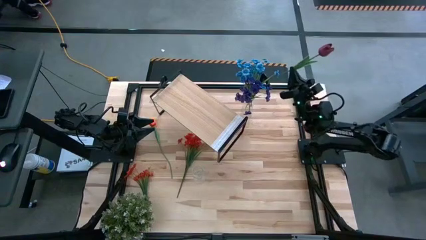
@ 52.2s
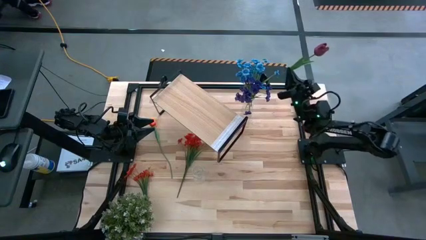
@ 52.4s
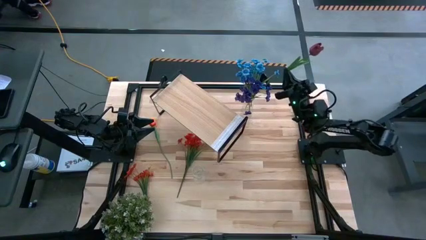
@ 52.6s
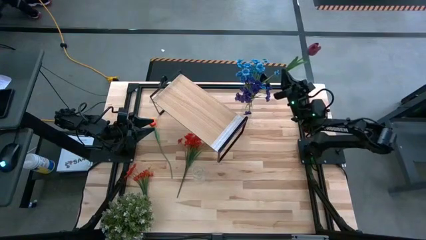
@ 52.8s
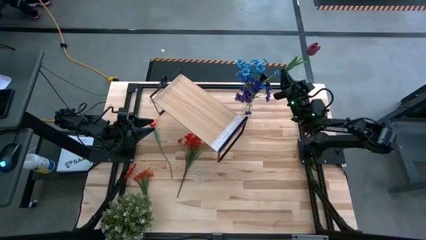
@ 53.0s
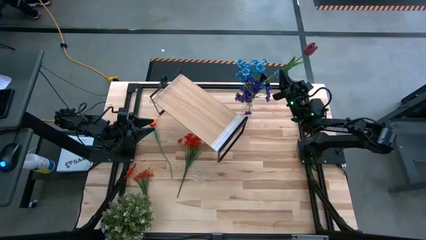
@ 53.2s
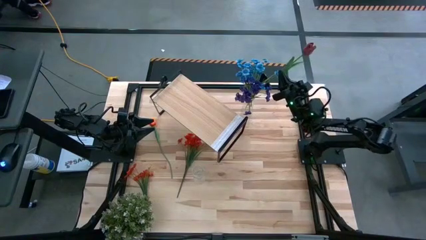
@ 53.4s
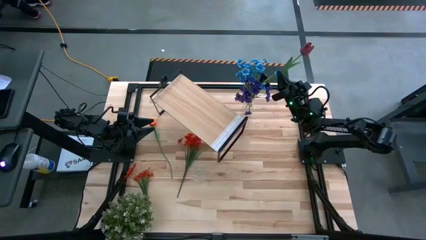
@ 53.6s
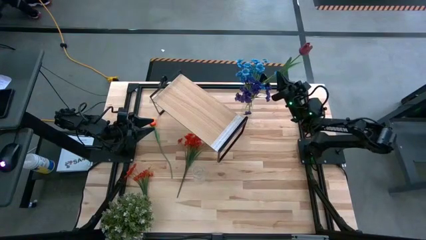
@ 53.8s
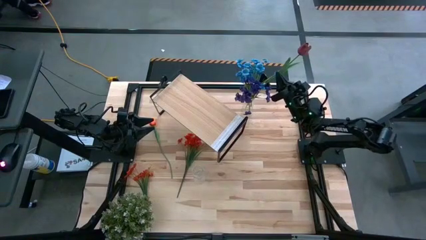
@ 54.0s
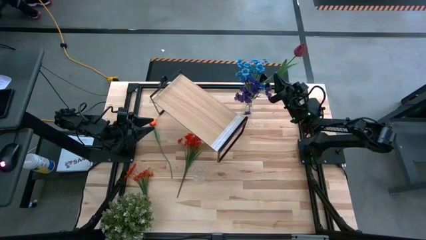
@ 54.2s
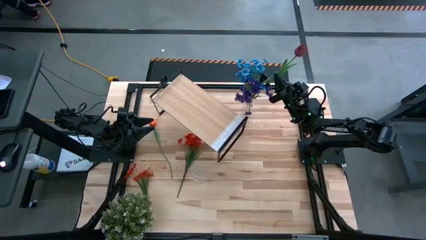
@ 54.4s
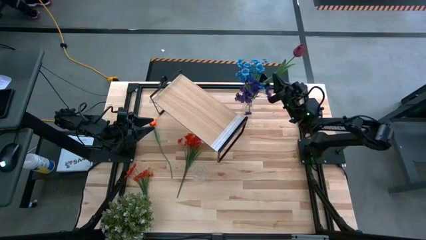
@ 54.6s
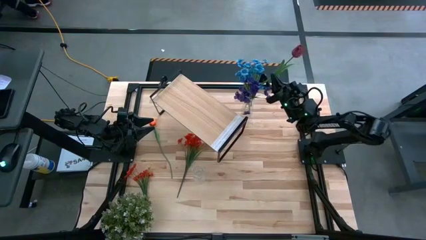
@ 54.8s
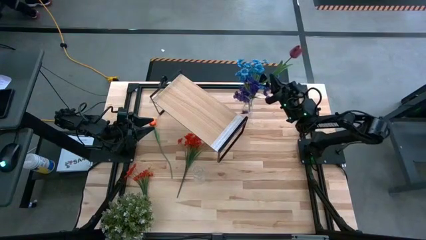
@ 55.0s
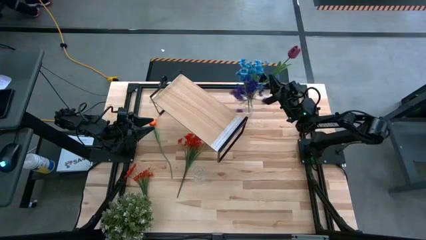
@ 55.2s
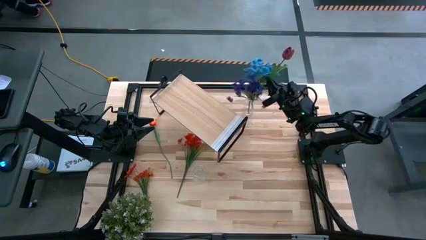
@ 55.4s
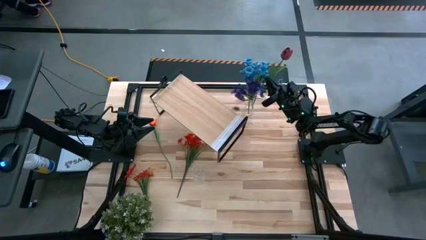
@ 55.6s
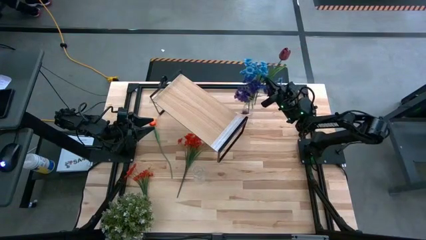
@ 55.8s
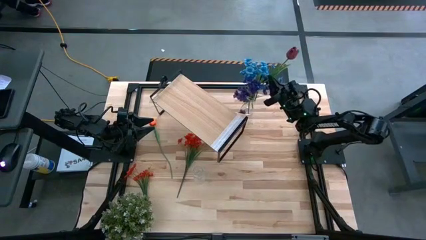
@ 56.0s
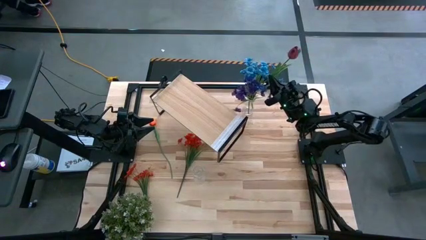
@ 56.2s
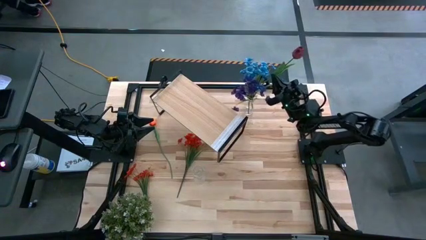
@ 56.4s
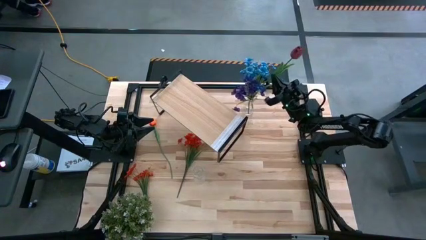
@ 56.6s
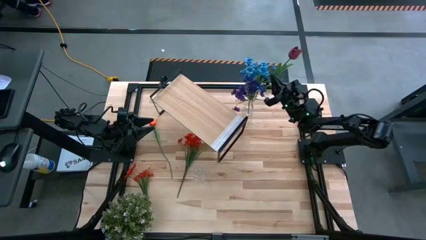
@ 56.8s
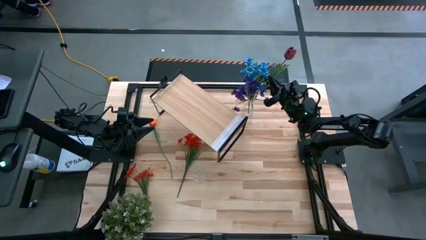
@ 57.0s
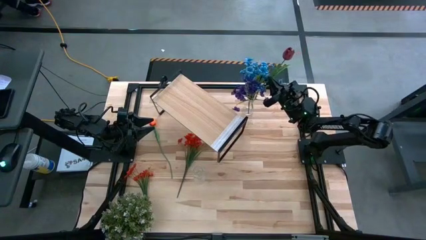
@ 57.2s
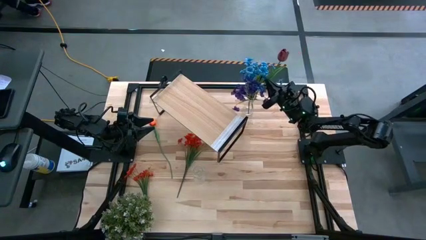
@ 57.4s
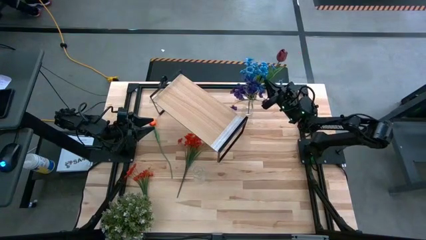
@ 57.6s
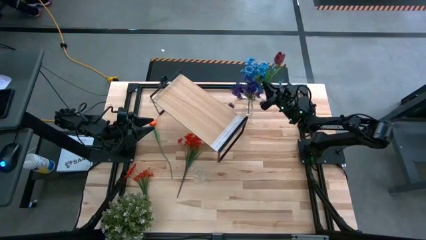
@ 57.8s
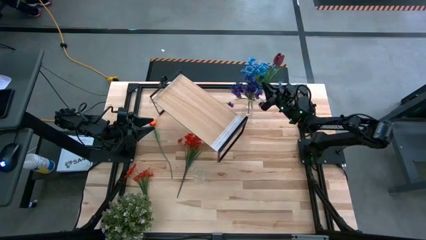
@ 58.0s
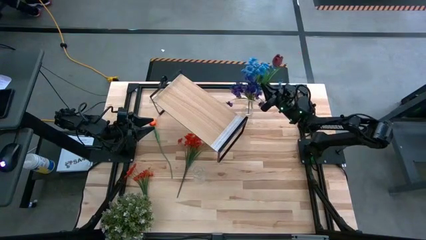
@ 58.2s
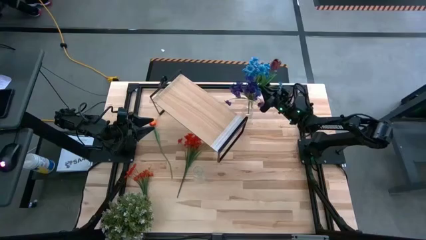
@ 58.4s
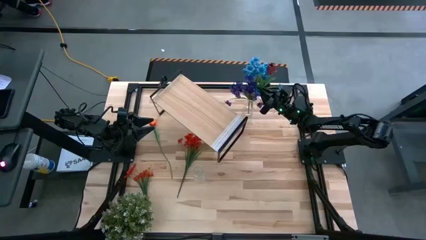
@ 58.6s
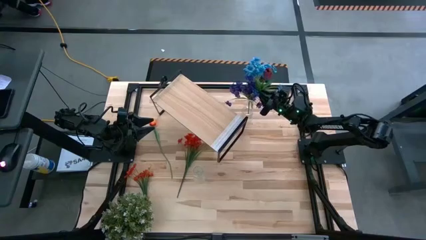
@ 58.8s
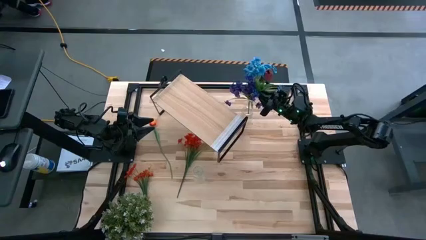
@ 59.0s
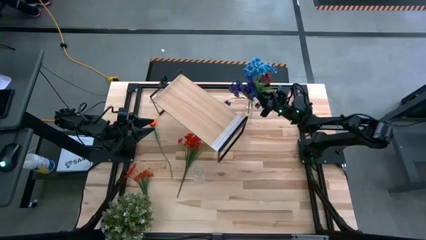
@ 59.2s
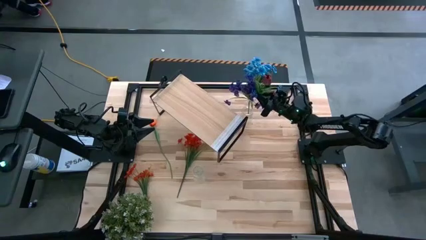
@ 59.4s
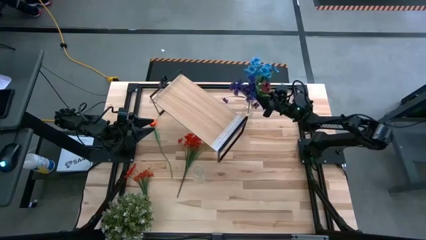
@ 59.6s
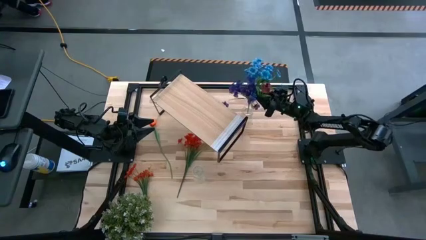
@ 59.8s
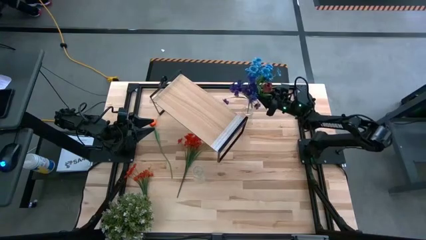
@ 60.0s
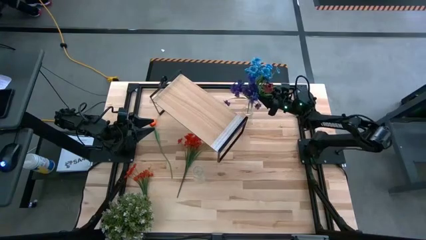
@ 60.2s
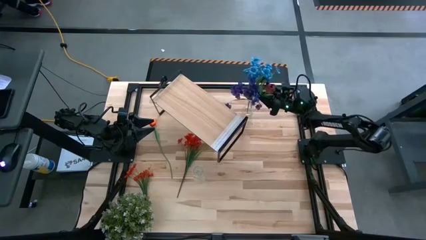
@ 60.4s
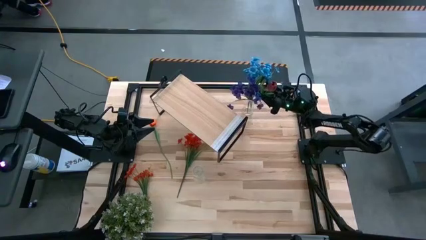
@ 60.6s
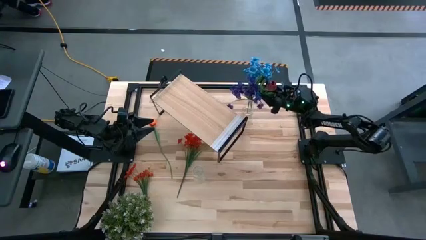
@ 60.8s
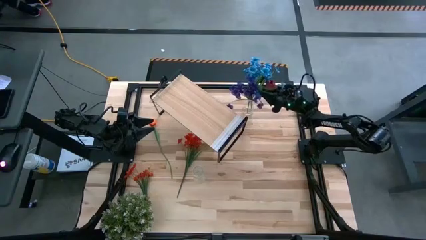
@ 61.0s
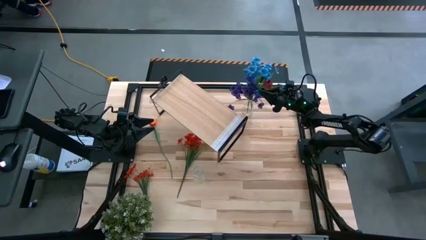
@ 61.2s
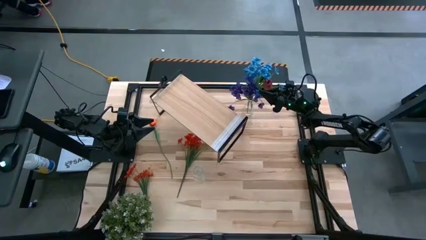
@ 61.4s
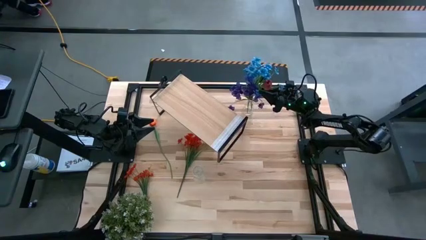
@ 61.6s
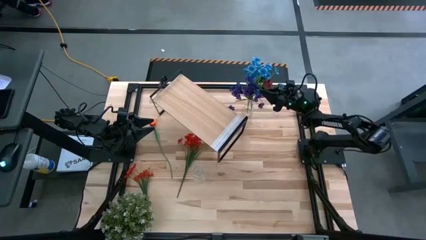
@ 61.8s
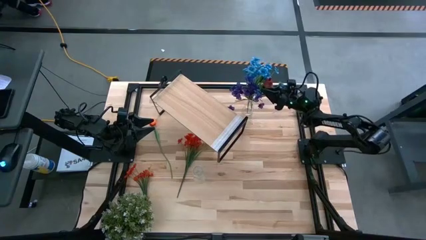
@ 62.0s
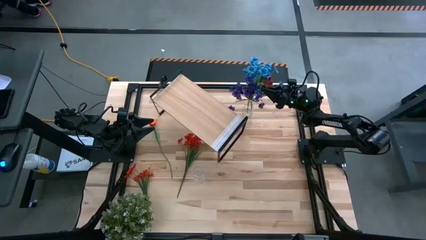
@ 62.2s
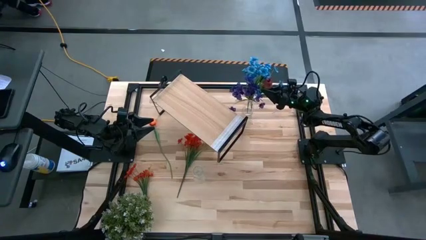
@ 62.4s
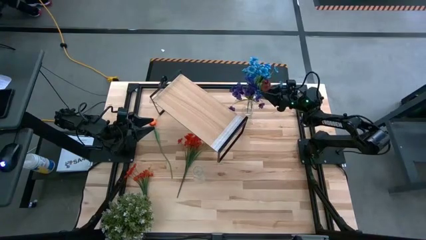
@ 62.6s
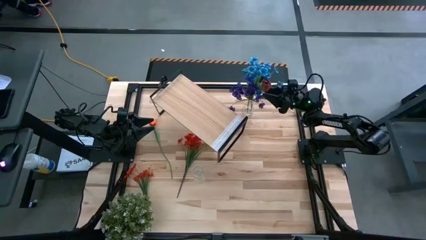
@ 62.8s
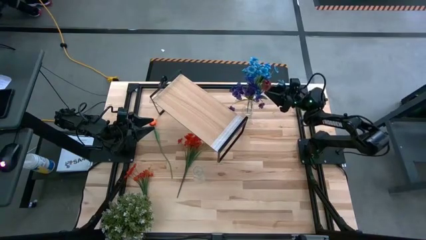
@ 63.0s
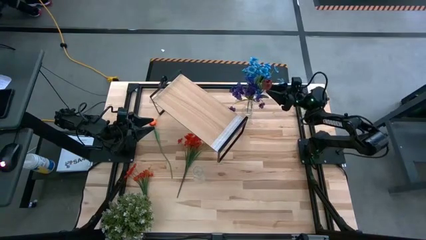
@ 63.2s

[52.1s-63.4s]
Task: Pick and place flowers into a vace then onto a shelf
Put the dark red flower into the top transparent flower vase
